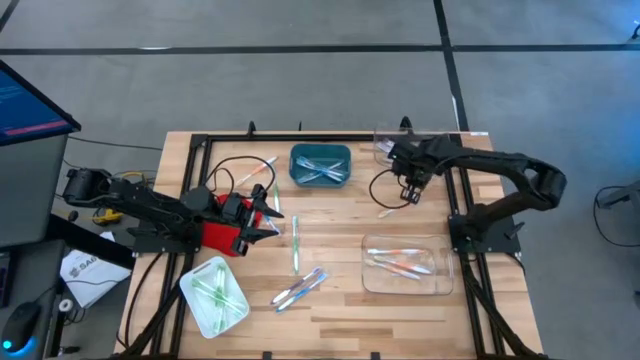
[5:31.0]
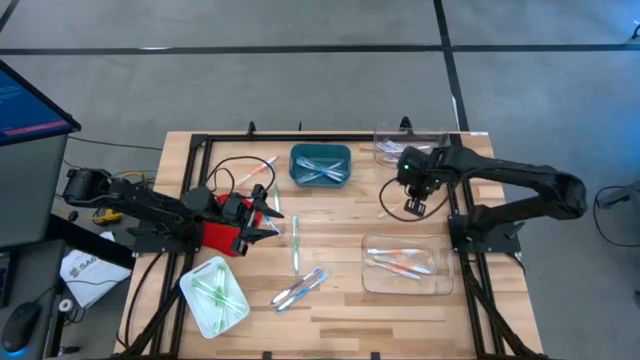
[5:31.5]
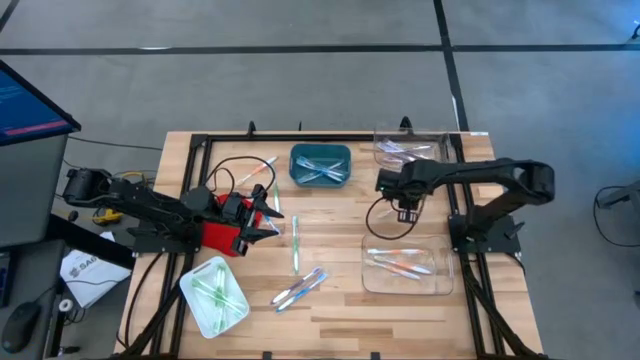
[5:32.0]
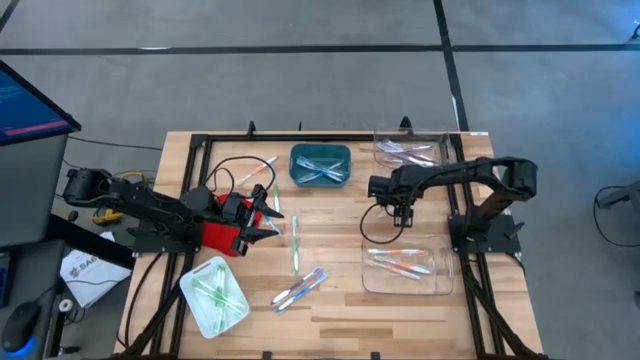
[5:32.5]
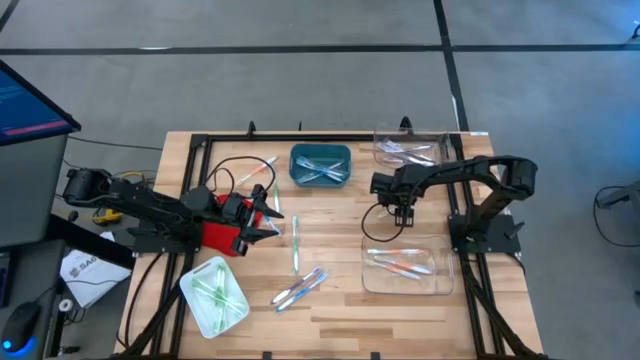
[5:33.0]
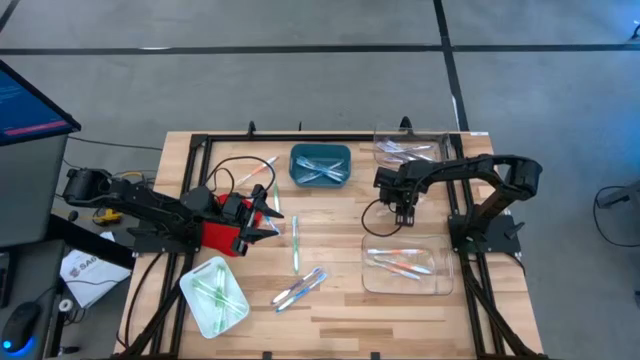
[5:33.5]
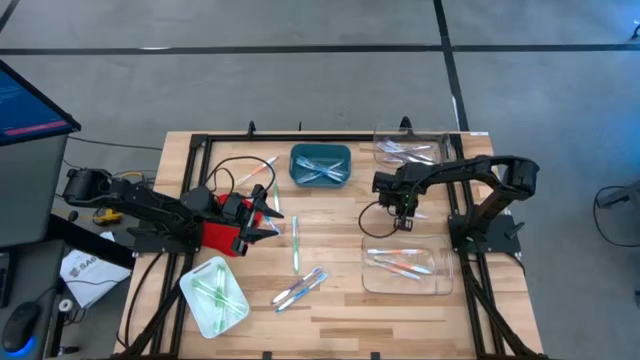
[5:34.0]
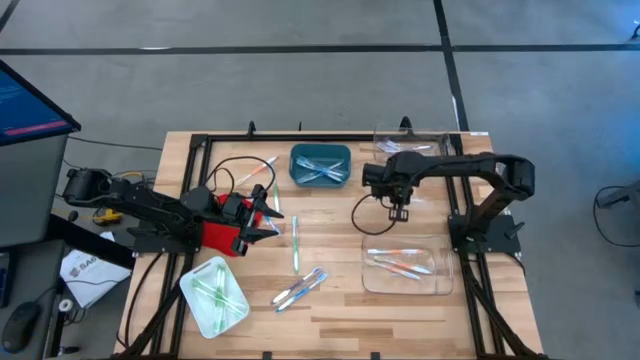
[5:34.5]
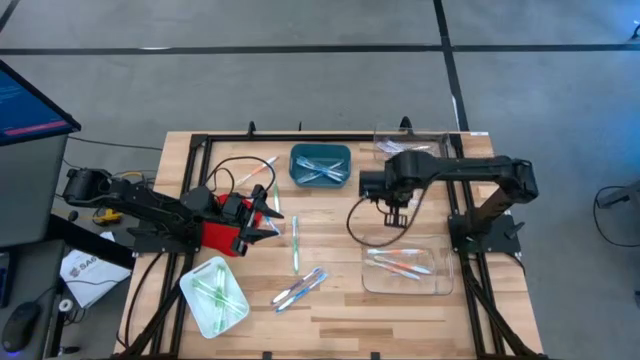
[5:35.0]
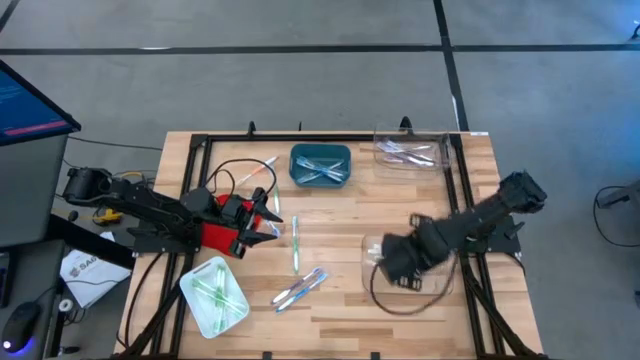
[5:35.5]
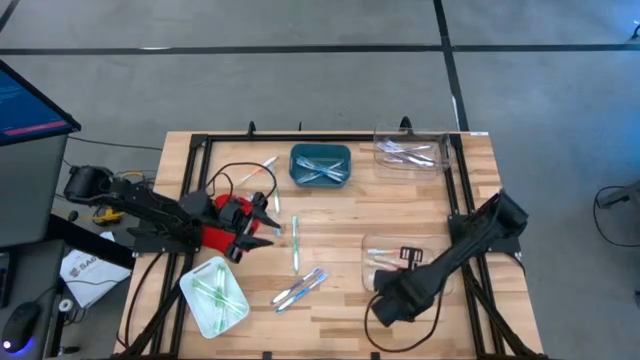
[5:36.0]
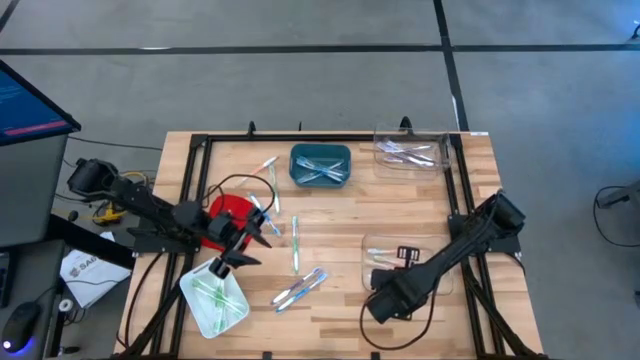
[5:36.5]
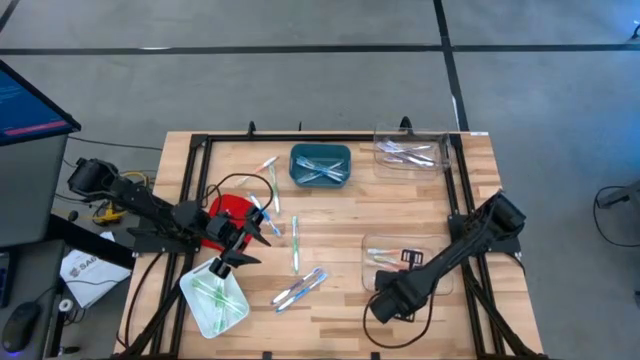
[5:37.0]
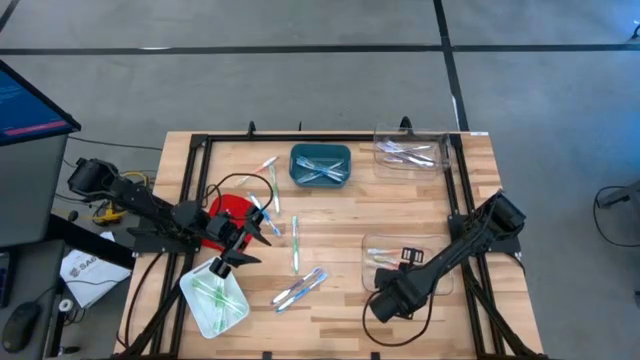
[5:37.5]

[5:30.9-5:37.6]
Task: Pick & Place Toothbrushes
Put the orange toothbrush into the bottom transparent bin

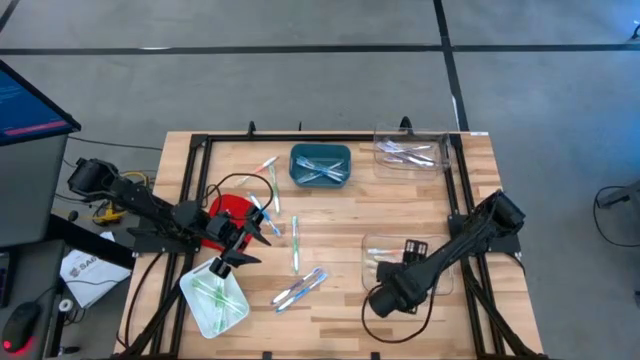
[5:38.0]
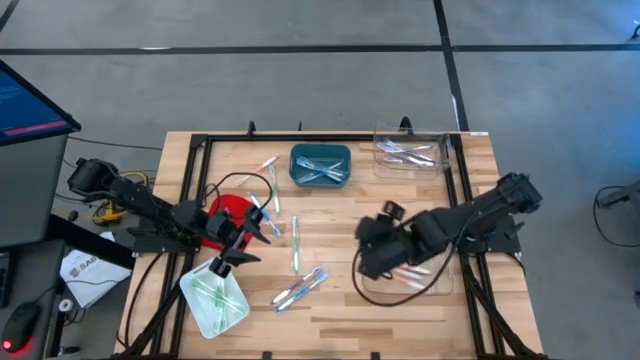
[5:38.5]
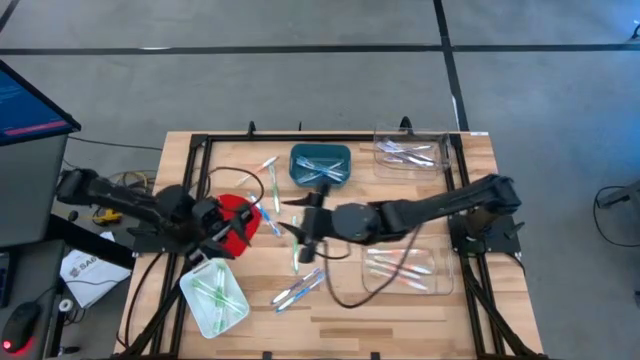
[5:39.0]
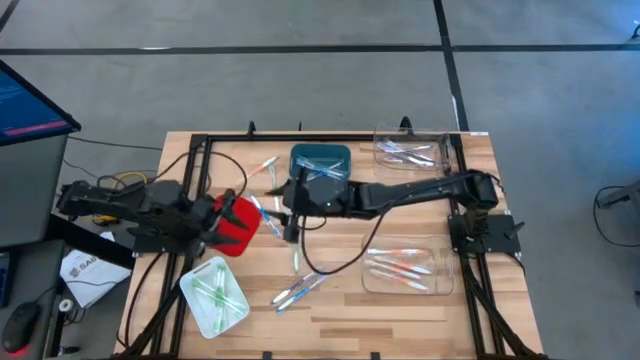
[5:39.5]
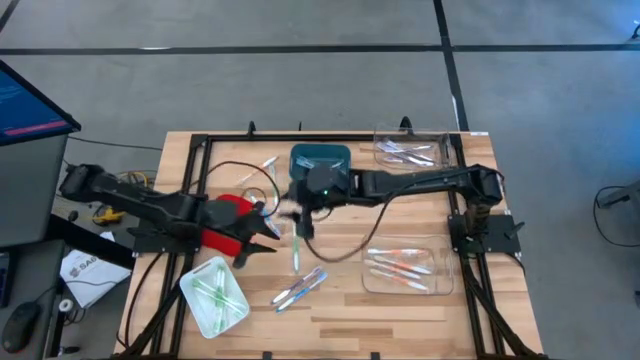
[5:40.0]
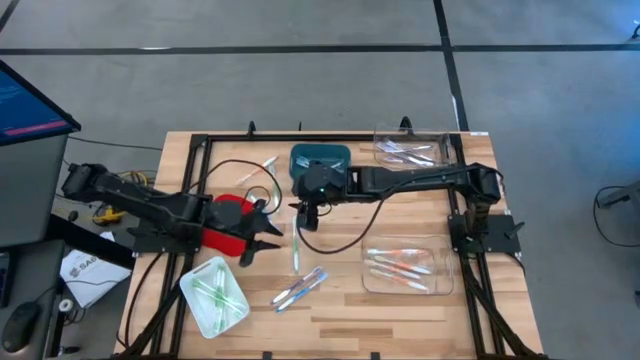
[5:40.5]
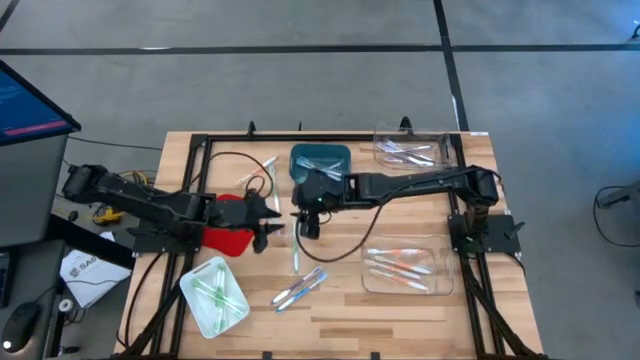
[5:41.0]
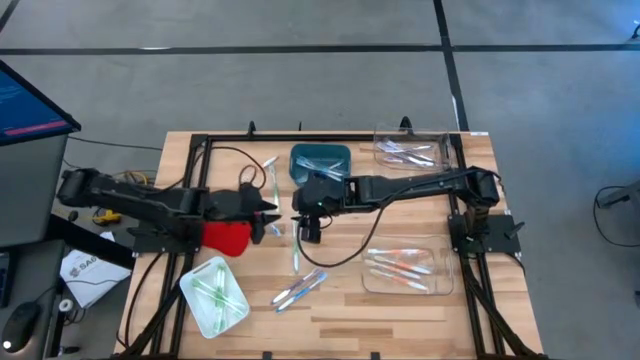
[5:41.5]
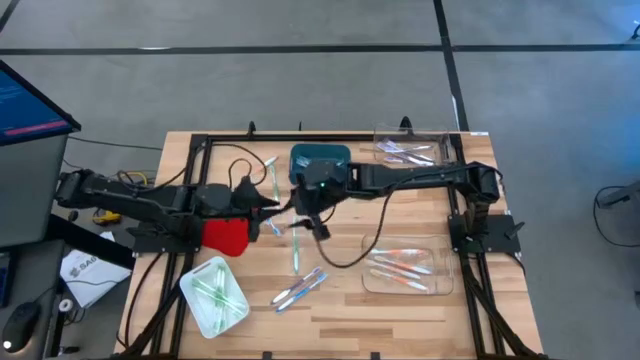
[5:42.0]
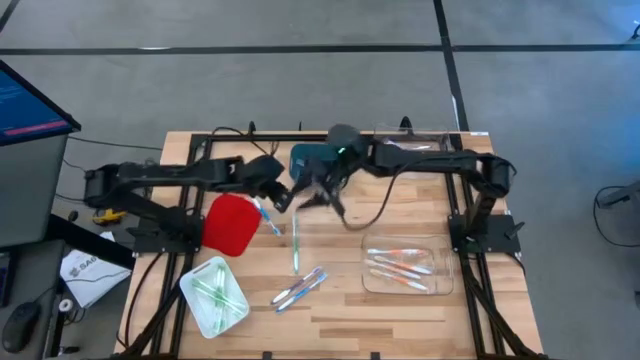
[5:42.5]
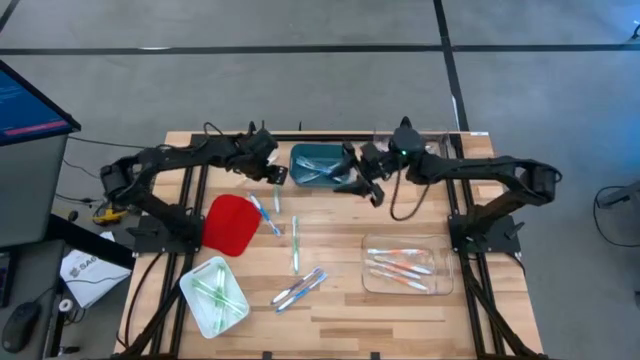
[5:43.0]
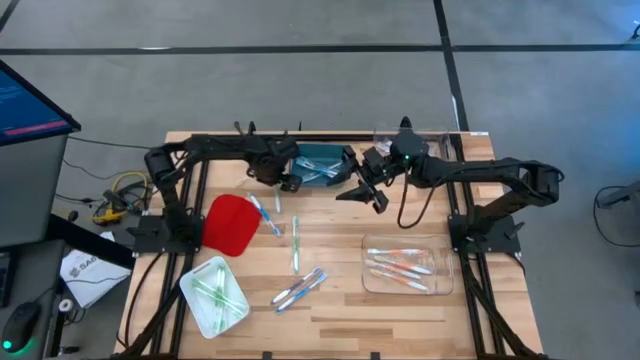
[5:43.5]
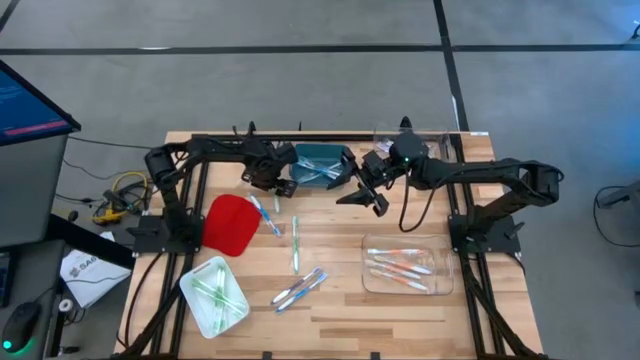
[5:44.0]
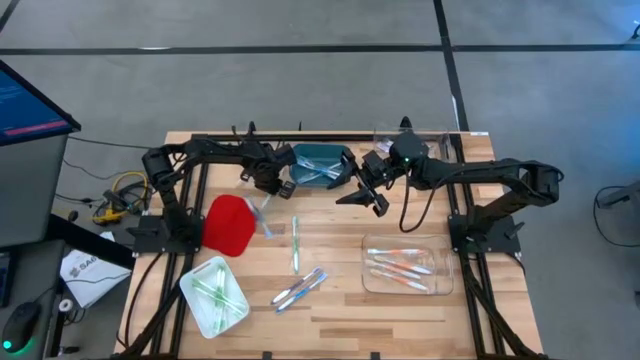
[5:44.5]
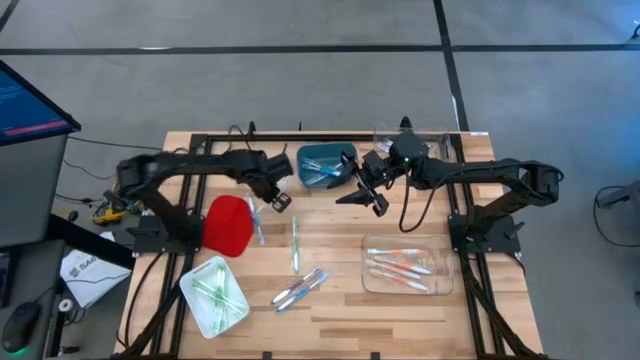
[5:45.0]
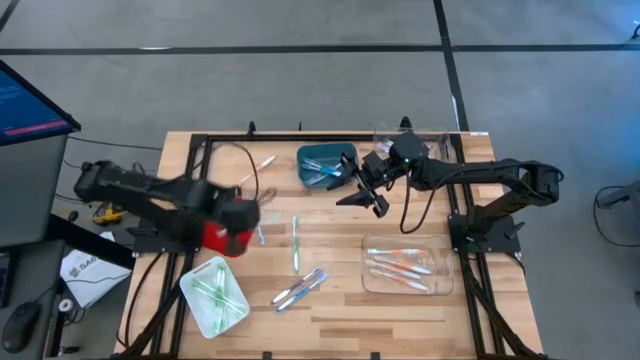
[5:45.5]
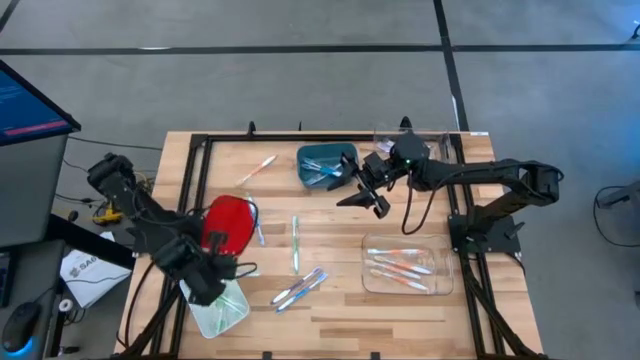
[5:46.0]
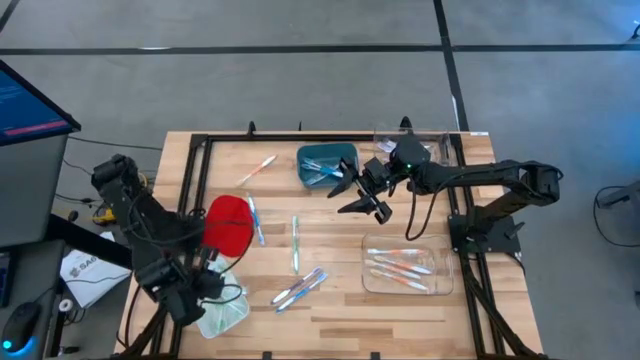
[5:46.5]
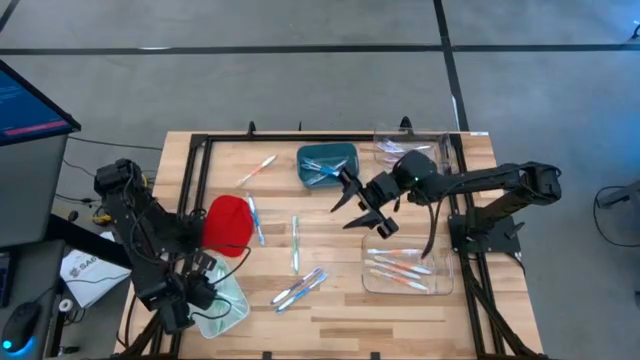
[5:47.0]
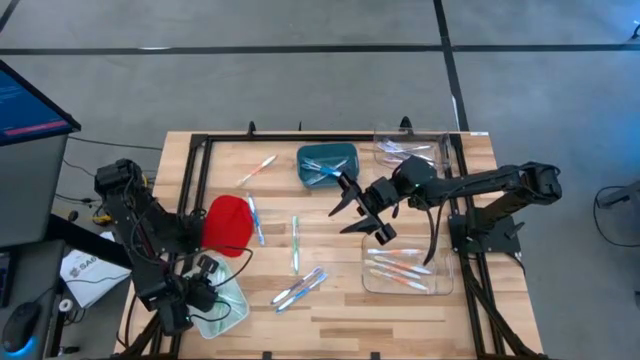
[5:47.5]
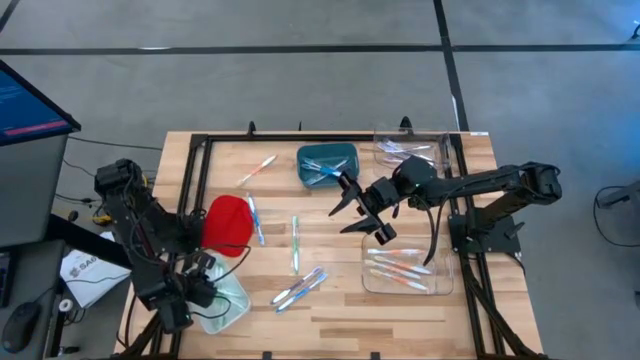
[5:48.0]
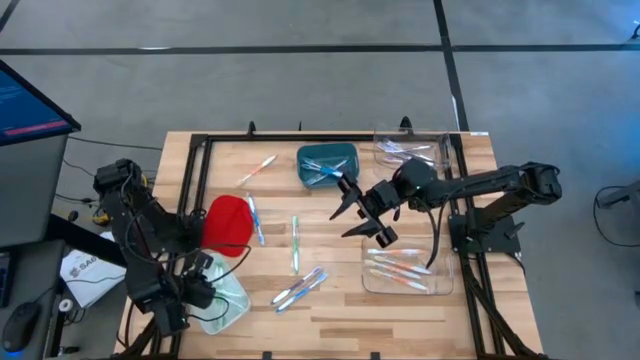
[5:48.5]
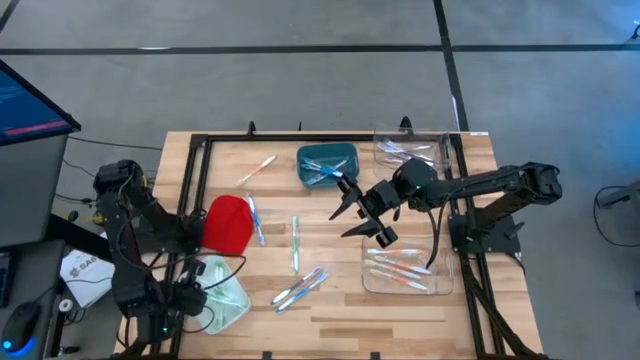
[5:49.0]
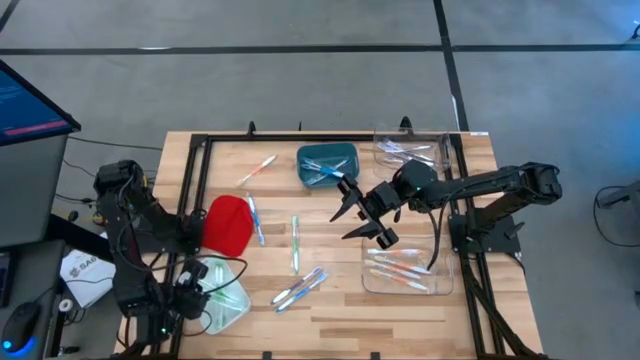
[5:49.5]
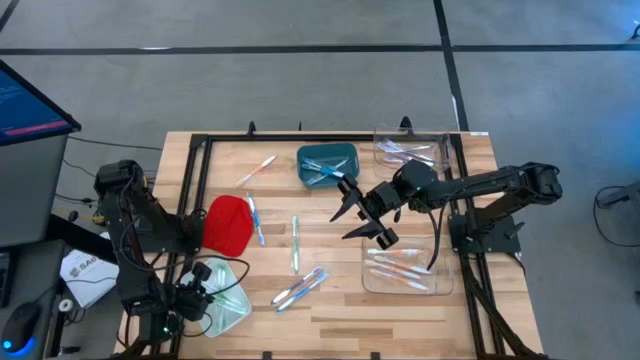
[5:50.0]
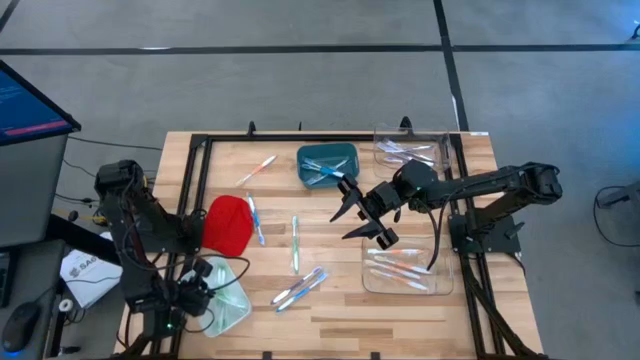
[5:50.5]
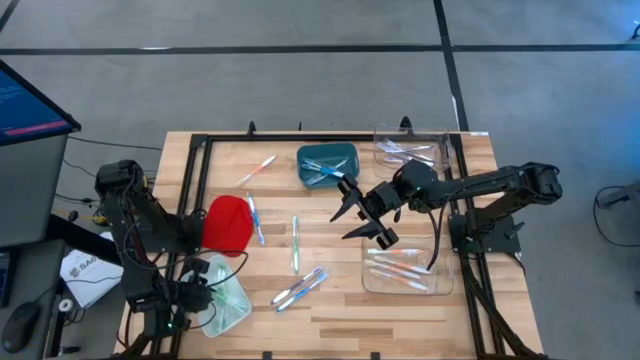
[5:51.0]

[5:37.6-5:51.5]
Put the green toothbrush into the white bin

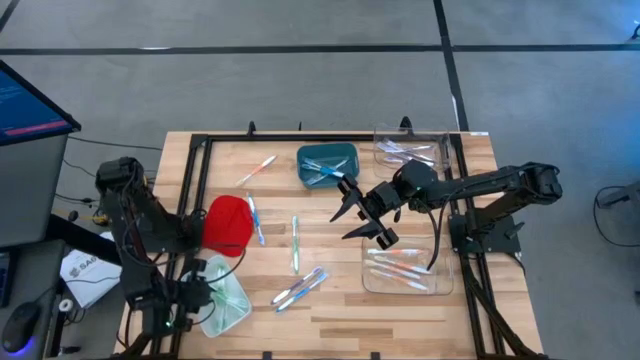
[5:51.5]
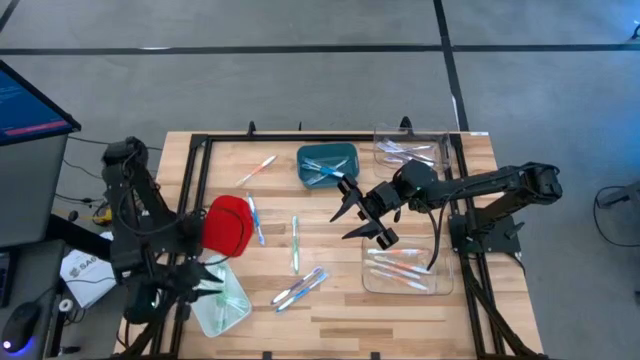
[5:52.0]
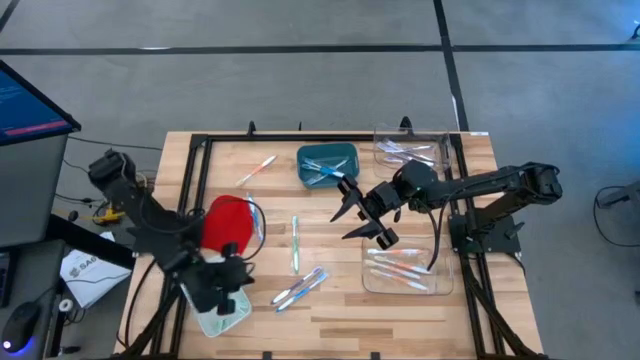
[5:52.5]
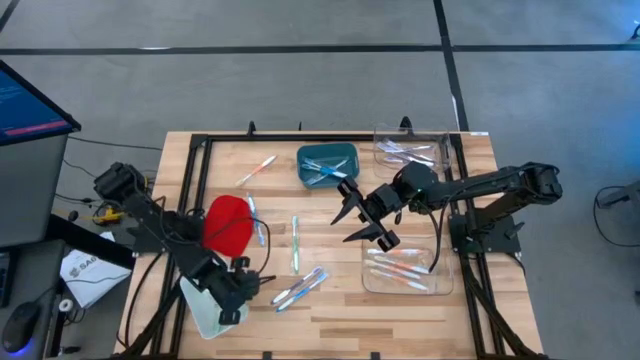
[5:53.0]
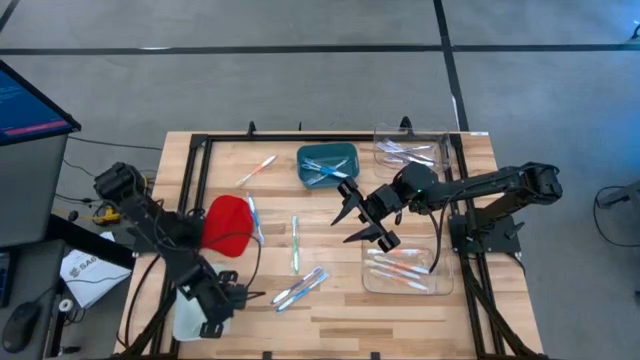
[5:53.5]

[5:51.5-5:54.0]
Adjust the white bin on the table
